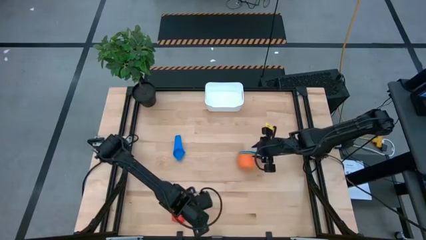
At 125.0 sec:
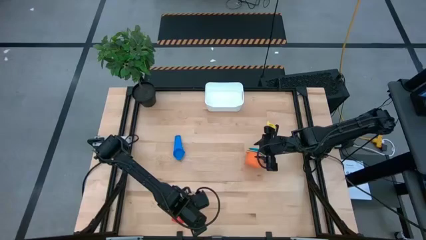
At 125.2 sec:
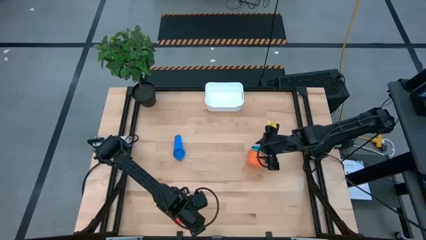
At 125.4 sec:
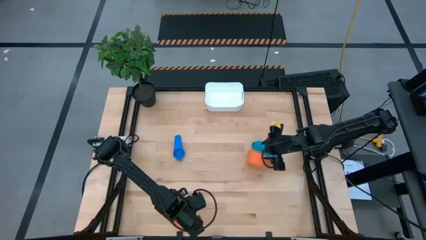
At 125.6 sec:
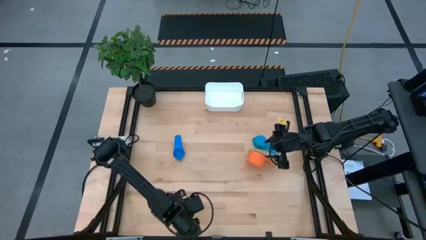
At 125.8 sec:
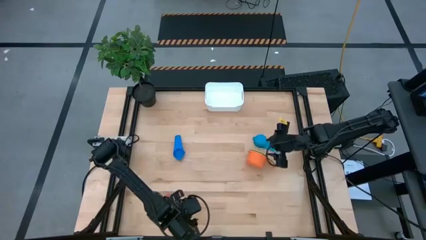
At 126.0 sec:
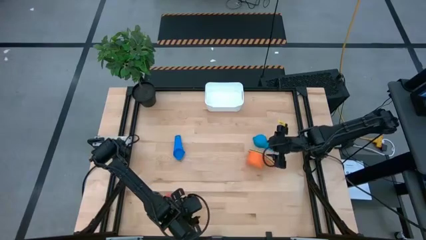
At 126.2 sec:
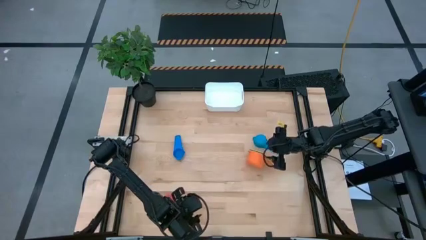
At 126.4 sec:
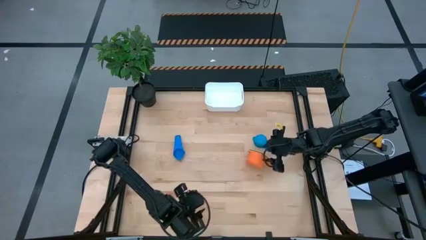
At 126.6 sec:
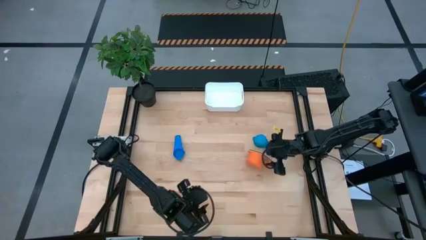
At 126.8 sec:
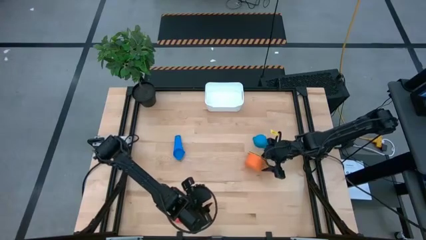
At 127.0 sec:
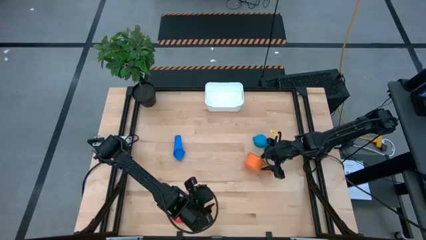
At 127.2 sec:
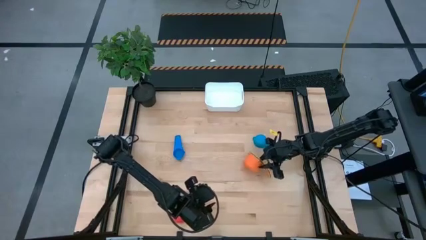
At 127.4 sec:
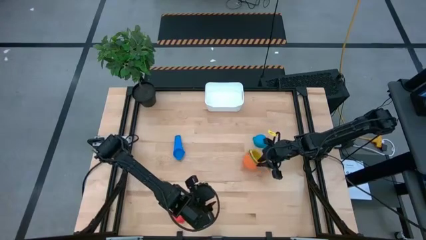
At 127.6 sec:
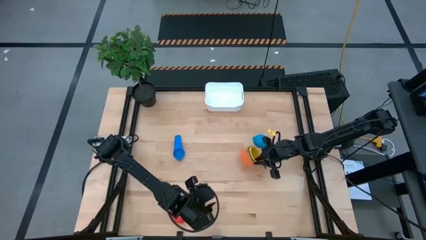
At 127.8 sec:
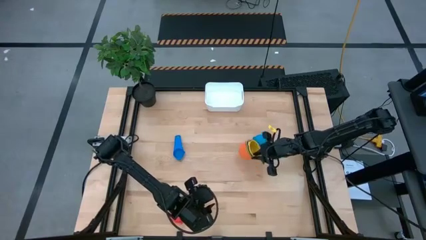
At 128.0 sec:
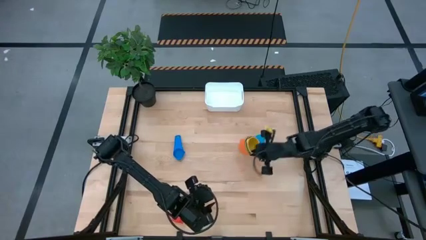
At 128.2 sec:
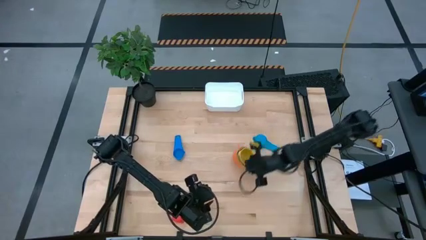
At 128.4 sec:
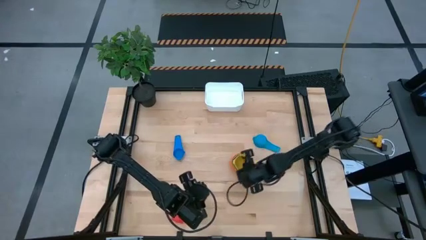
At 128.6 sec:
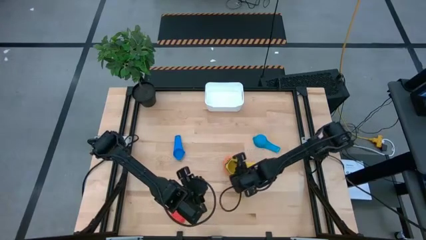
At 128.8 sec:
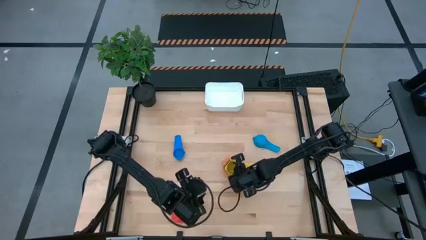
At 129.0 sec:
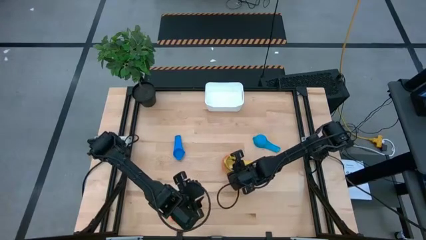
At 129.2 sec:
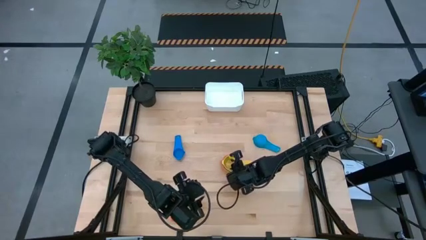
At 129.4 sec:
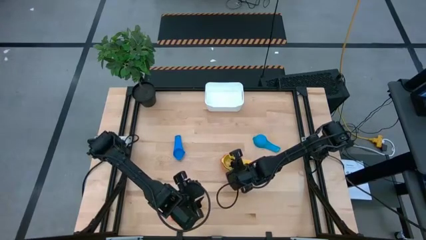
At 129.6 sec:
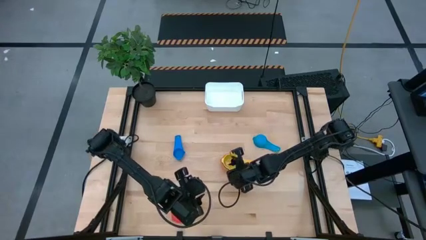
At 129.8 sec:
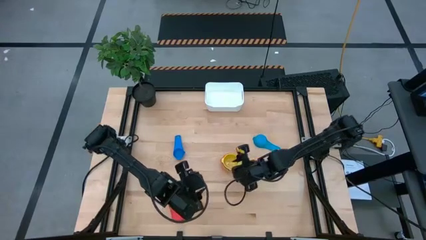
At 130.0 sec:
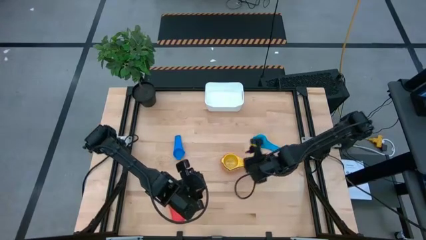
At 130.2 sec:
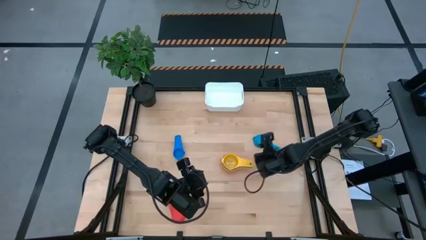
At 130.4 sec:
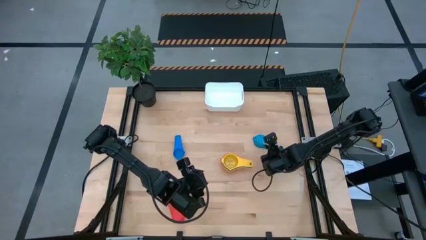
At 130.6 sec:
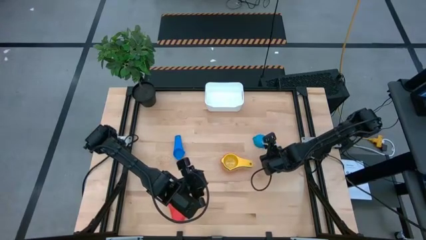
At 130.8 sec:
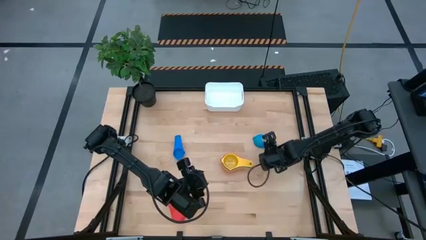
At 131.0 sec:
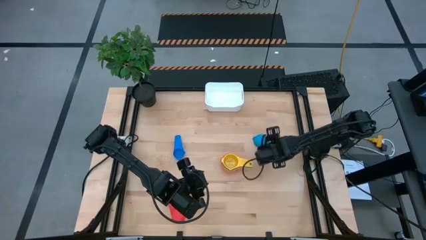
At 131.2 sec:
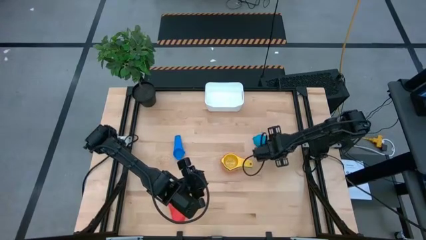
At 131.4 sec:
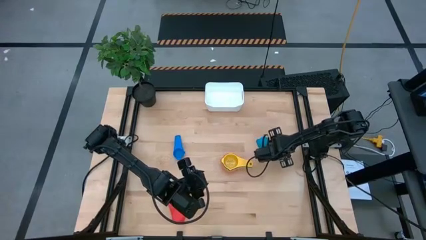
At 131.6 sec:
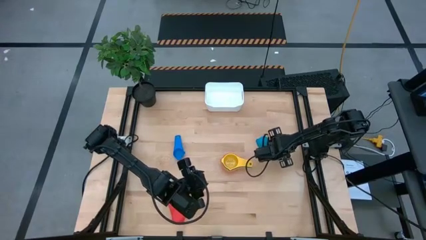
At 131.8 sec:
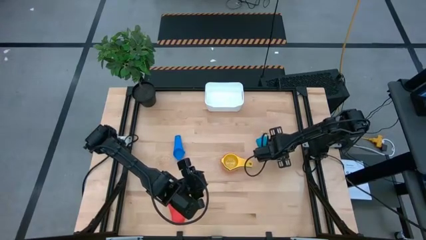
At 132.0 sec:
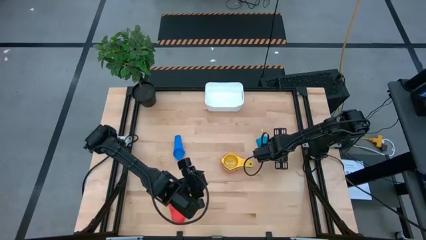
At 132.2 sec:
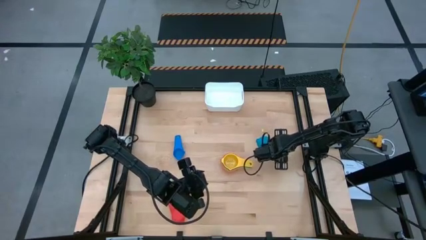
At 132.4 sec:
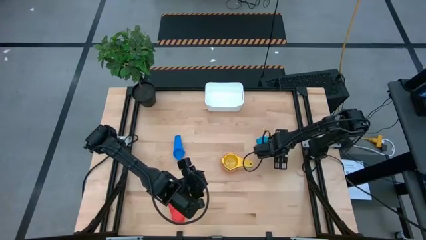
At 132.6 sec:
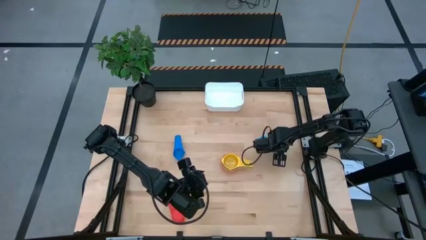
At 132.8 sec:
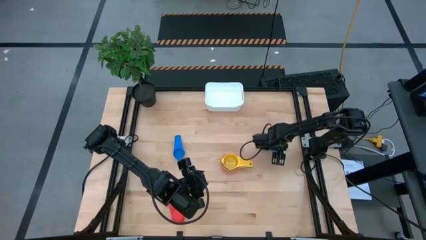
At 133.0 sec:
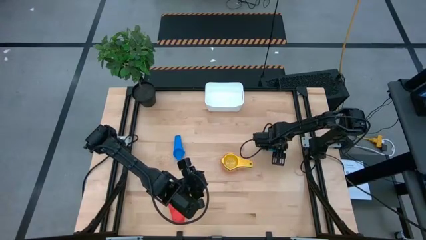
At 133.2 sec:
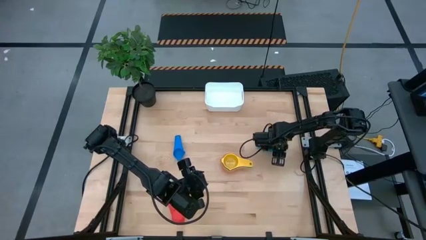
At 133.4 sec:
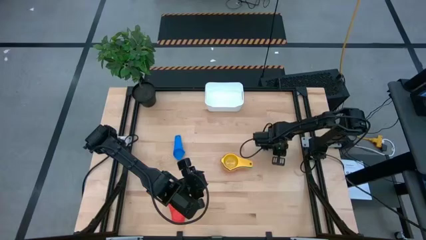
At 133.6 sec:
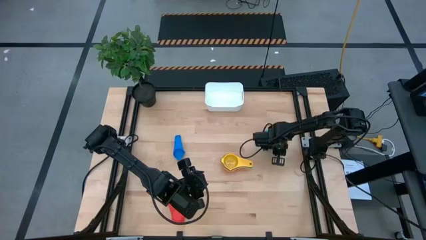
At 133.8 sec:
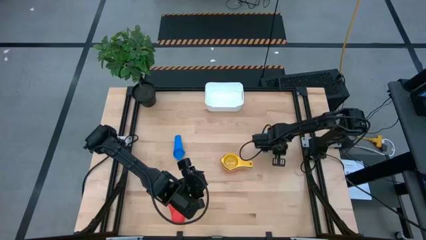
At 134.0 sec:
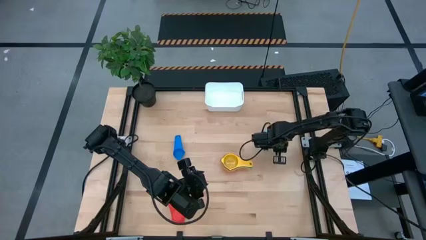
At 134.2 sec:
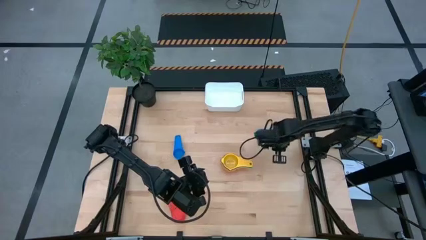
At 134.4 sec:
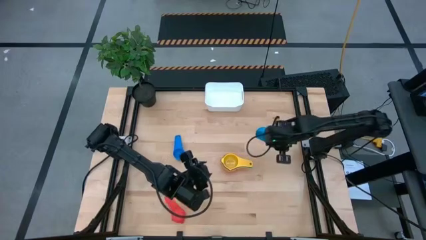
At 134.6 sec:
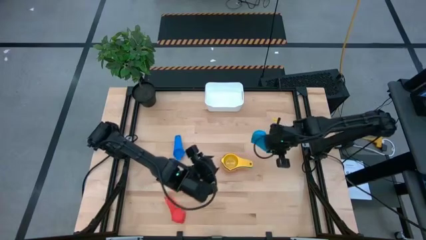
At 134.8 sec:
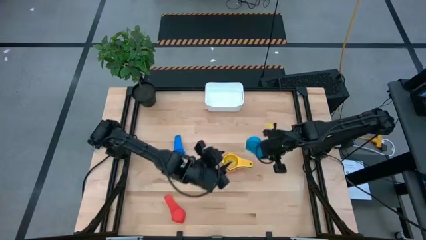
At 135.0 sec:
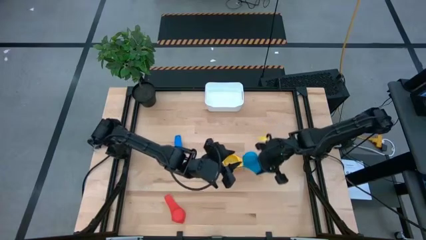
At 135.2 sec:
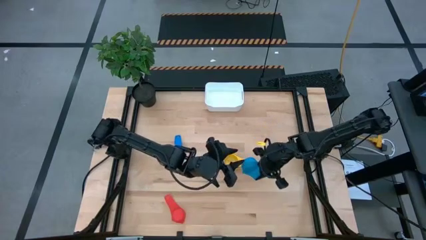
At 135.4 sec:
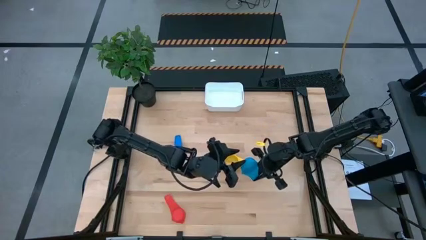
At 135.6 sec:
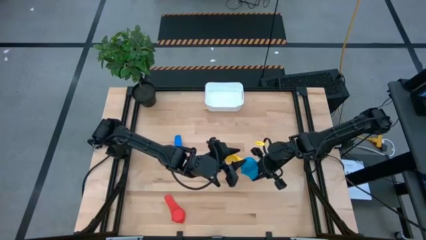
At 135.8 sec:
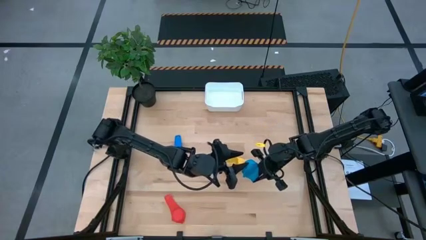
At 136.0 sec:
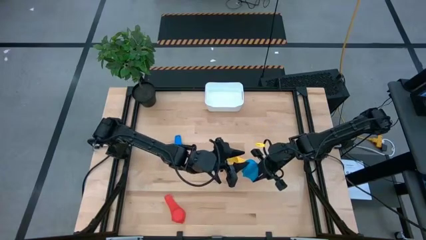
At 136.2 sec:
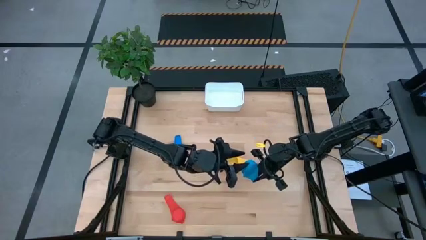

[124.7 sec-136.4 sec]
Task: Nest measuring cups in basket
Stack the light blue measuring cup on top of the yellow measuring cup

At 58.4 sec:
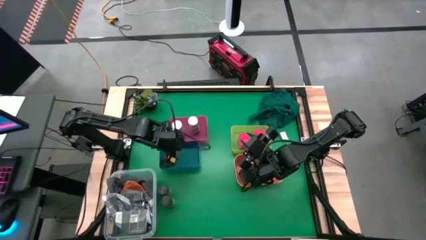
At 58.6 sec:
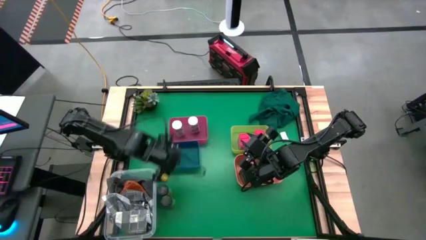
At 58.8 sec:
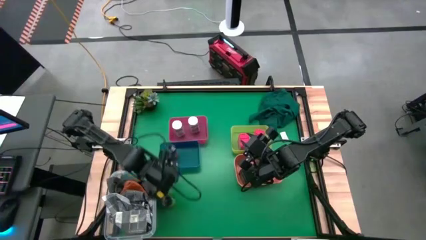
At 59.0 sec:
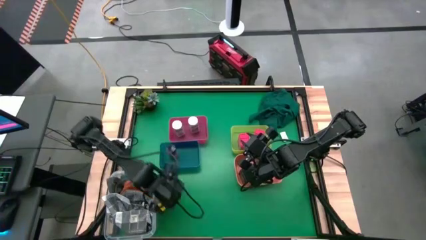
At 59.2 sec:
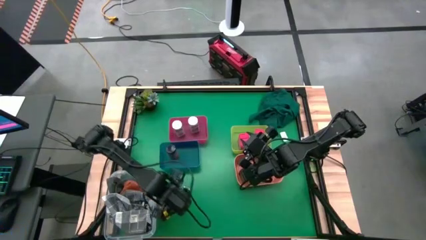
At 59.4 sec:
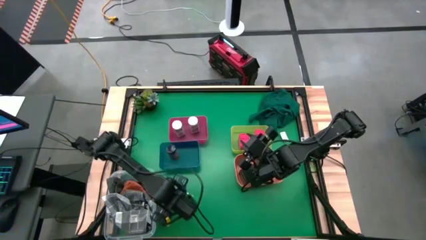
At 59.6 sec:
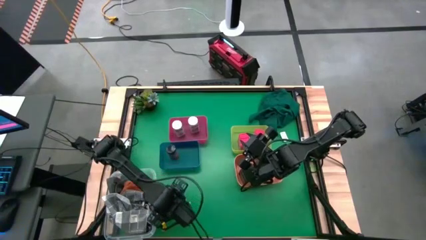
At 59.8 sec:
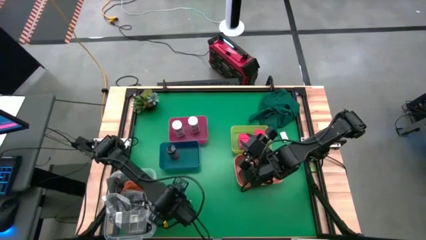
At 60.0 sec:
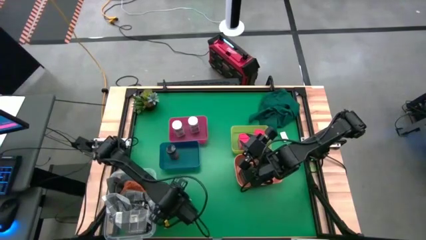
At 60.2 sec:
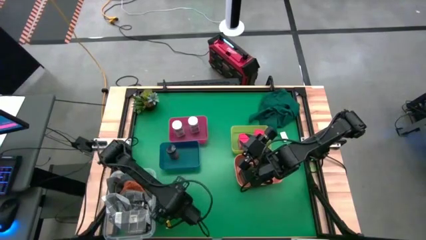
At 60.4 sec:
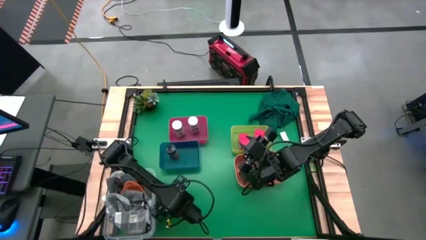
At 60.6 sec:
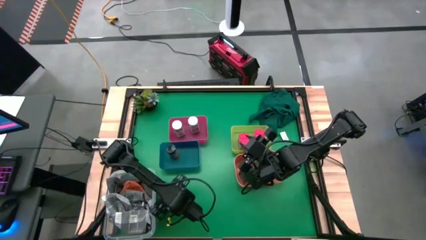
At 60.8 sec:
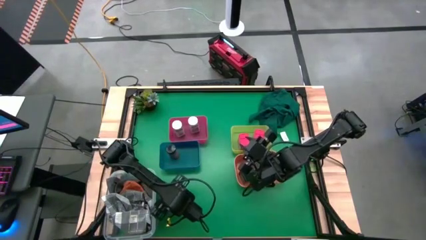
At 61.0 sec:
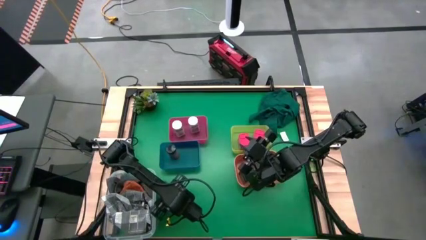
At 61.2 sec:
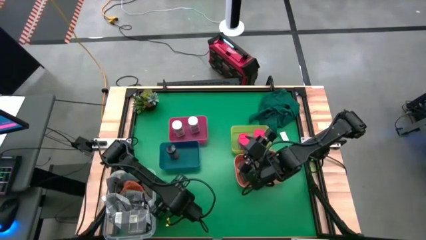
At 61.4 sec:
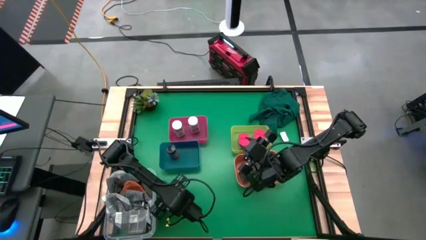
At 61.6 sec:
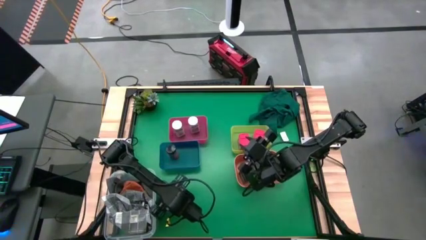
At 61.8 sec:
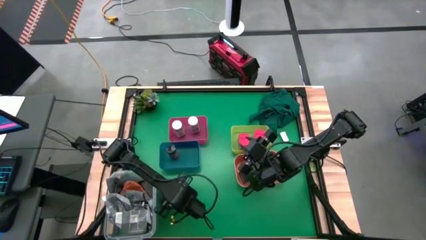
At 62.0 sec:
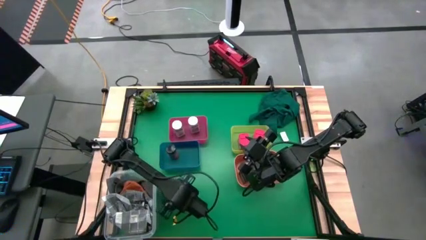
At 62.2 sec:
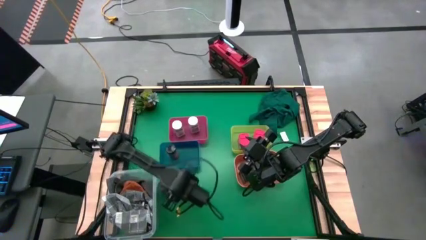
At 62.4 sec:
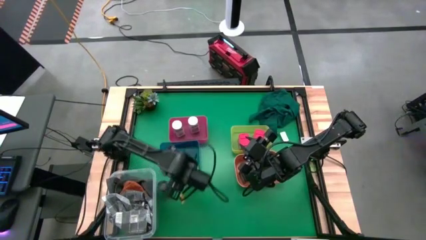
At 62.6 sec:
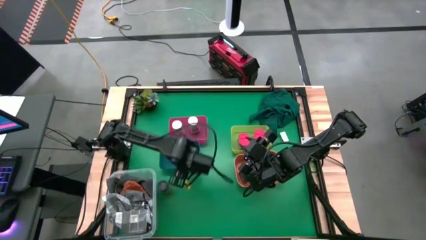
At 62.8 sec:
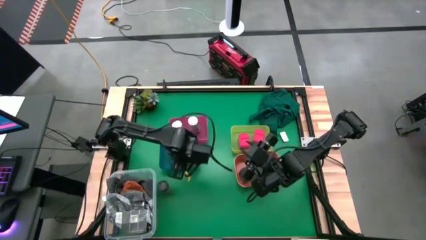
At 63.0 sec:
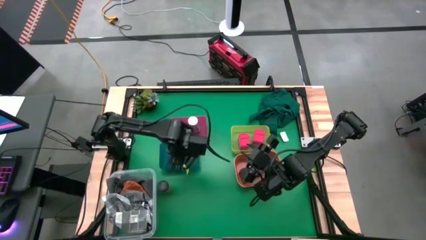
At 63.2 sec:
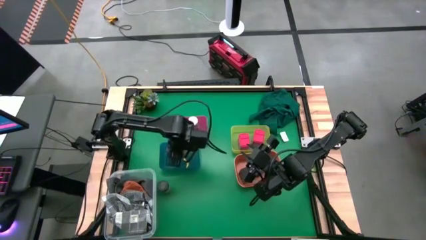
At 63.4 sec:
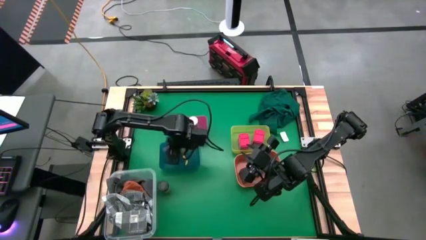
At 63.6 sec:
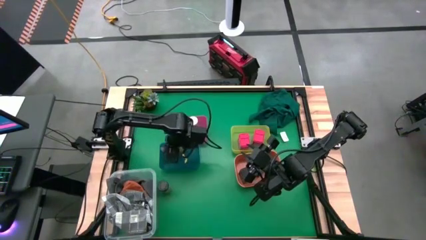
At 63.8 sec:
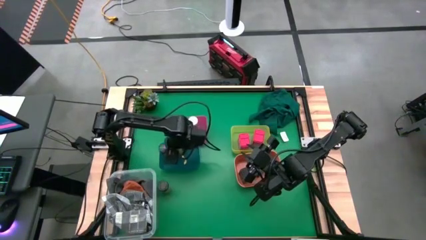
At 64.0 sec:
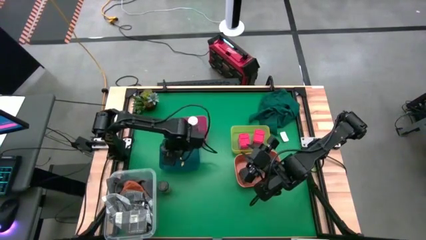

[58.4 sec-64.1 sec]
Task: Sort spices by type
Put the bottom black seasoning bottle into the blue bin
